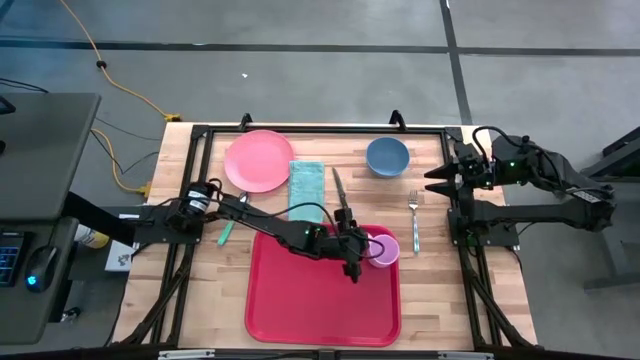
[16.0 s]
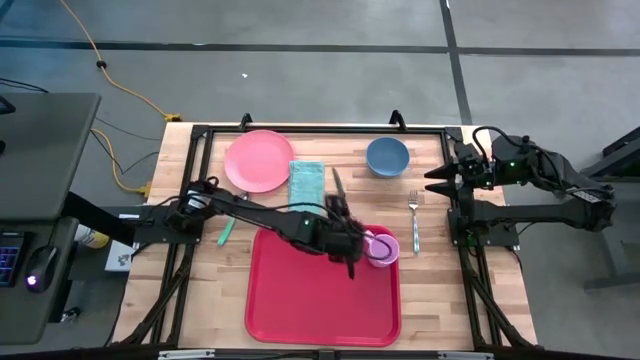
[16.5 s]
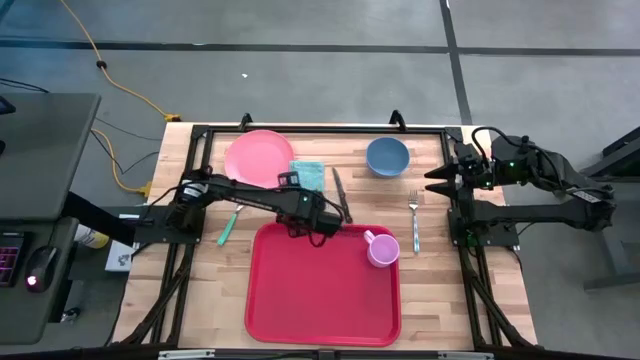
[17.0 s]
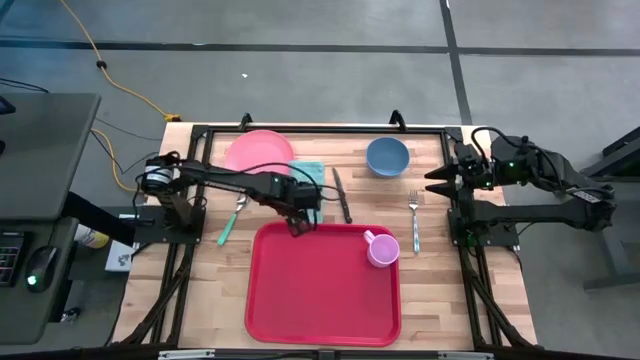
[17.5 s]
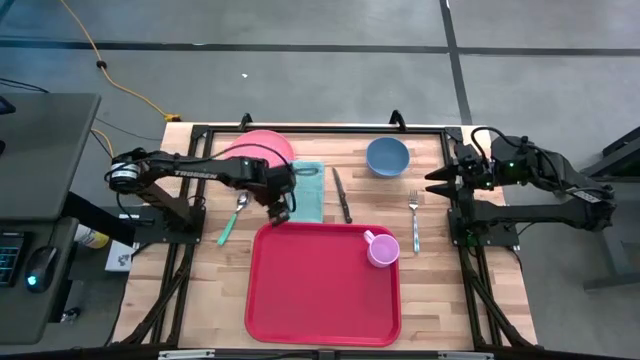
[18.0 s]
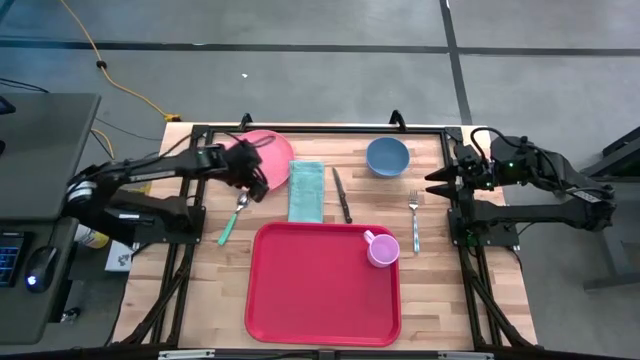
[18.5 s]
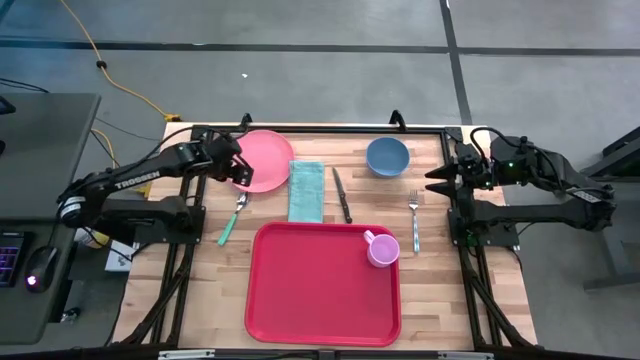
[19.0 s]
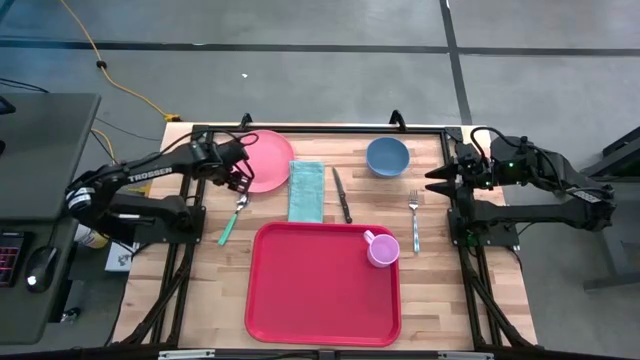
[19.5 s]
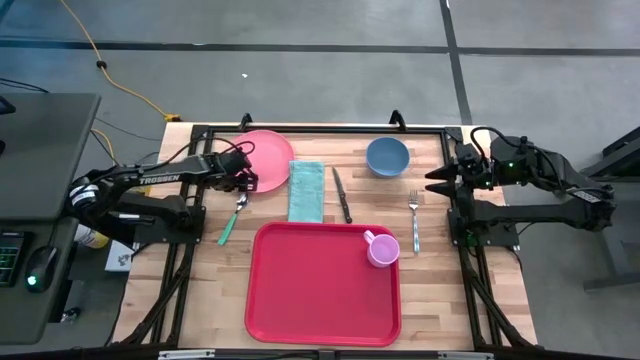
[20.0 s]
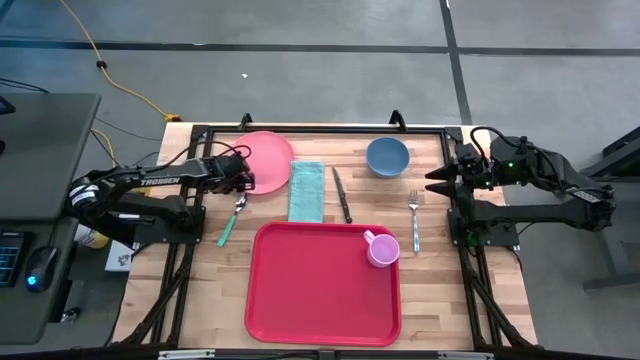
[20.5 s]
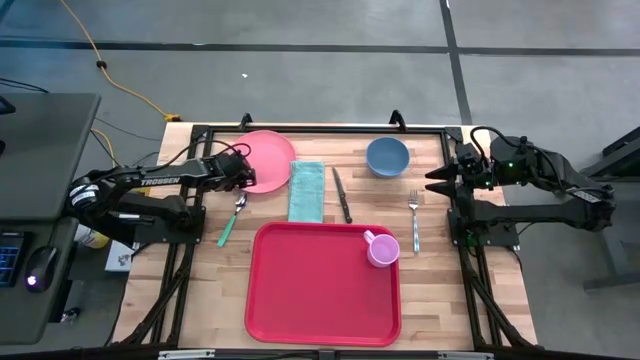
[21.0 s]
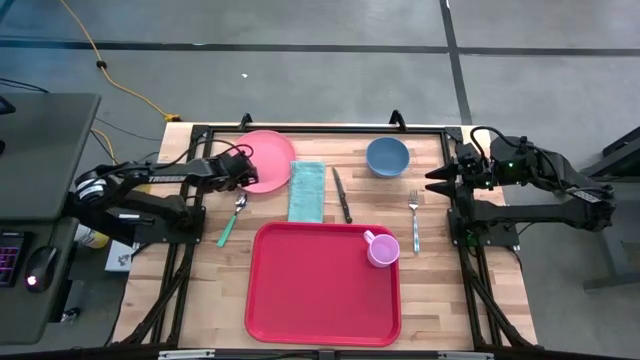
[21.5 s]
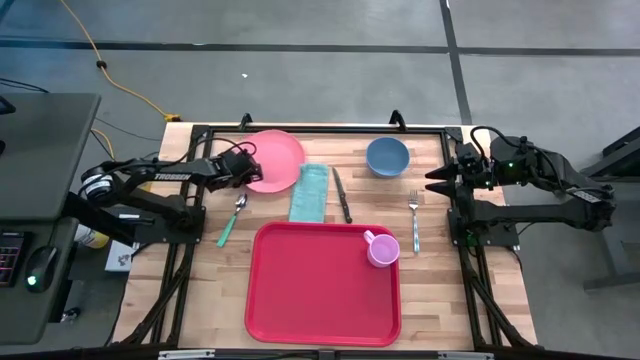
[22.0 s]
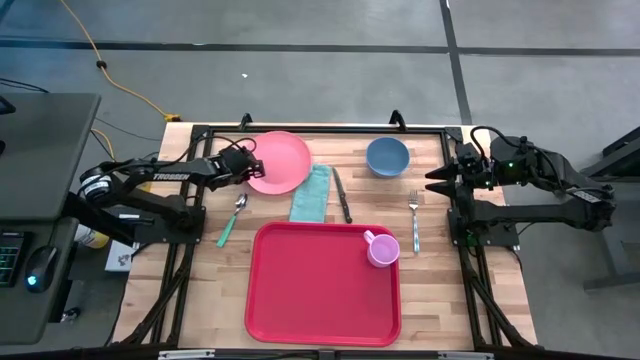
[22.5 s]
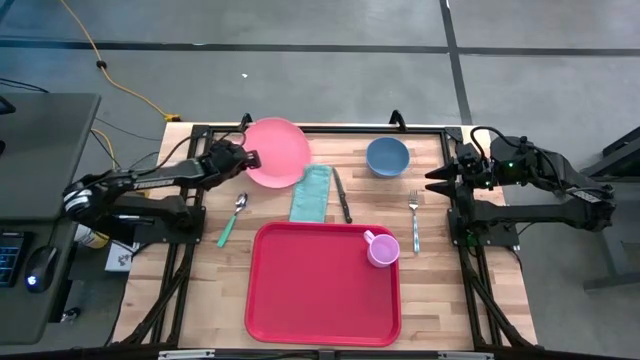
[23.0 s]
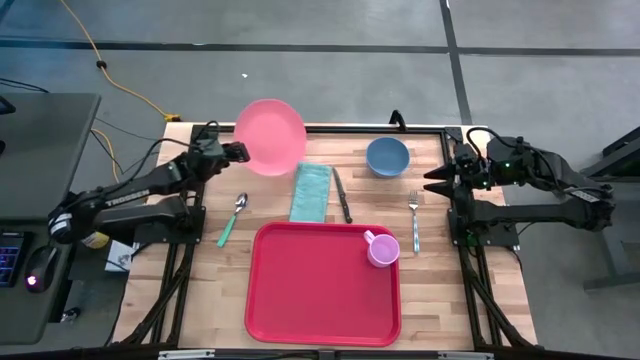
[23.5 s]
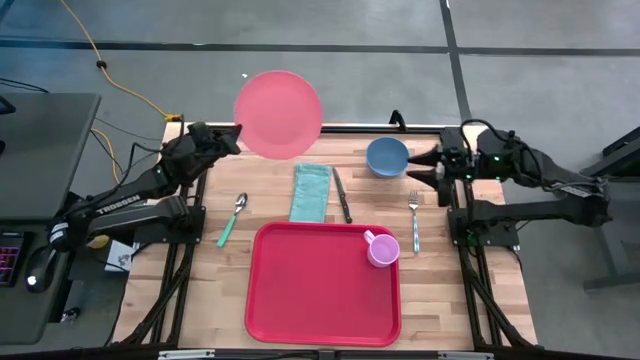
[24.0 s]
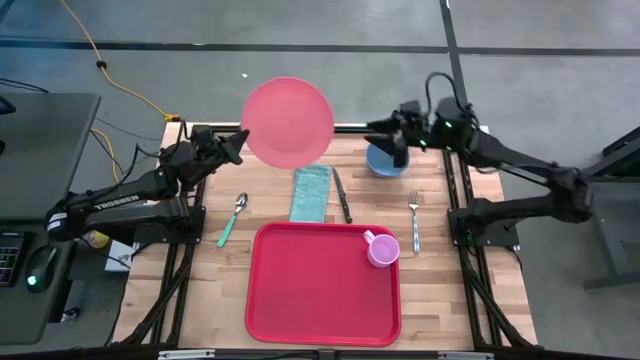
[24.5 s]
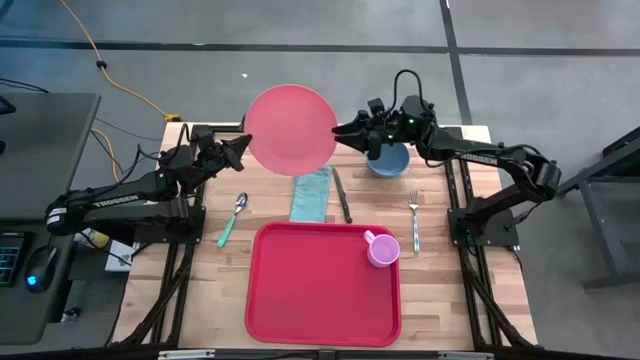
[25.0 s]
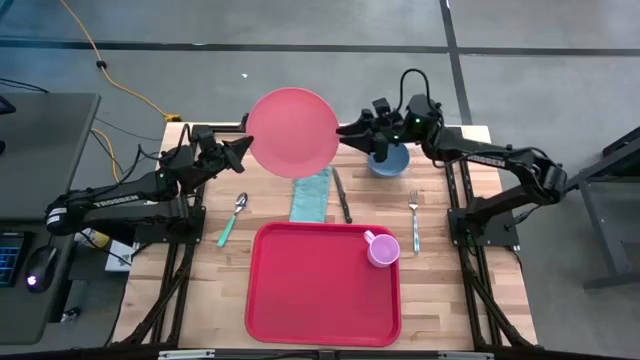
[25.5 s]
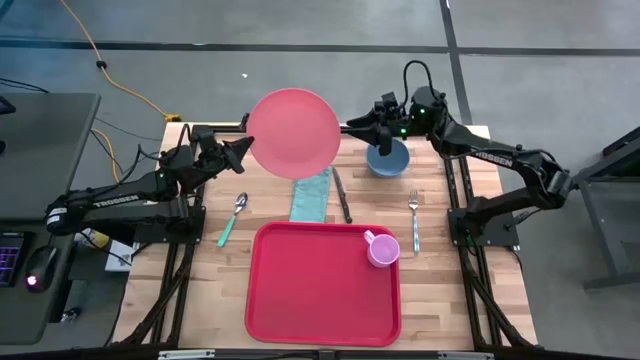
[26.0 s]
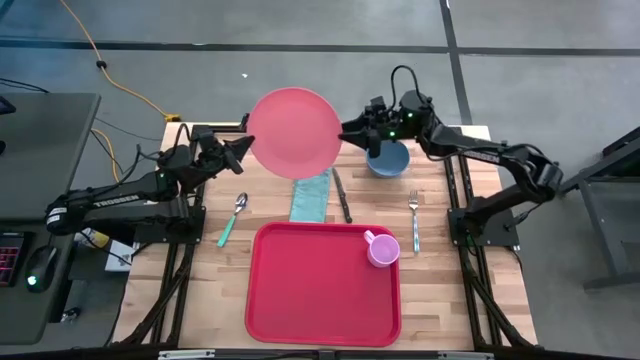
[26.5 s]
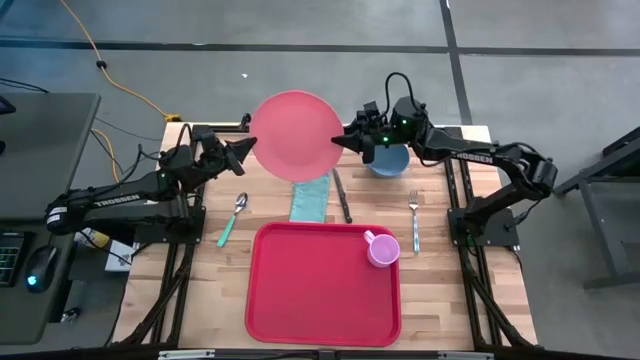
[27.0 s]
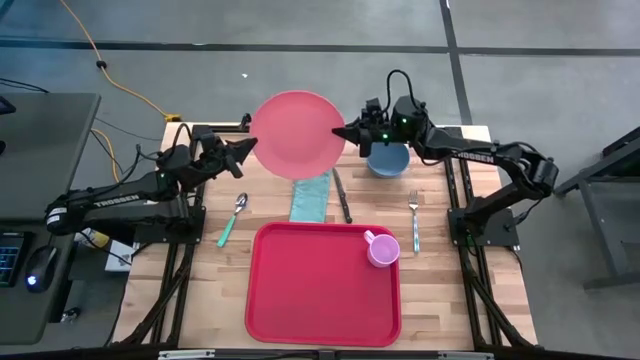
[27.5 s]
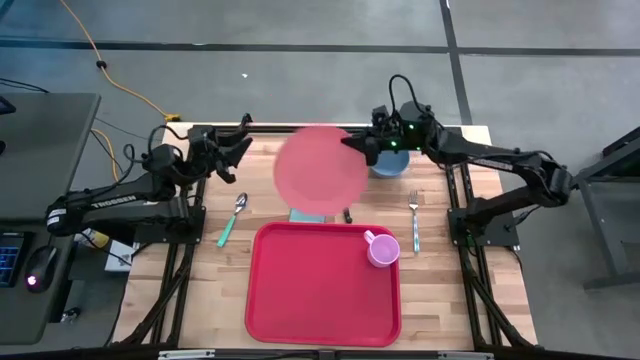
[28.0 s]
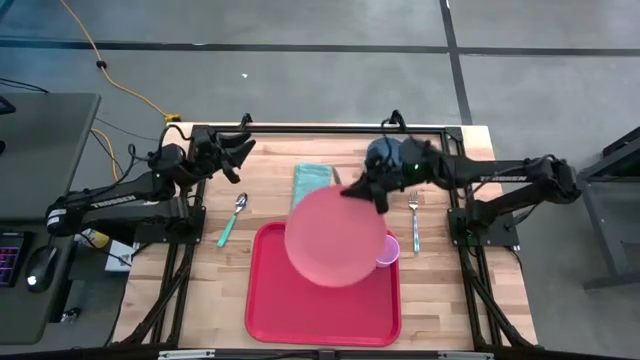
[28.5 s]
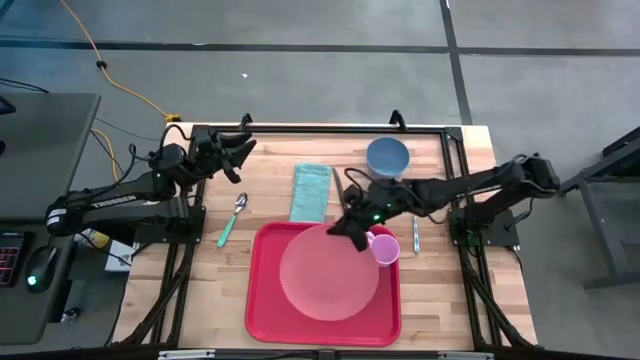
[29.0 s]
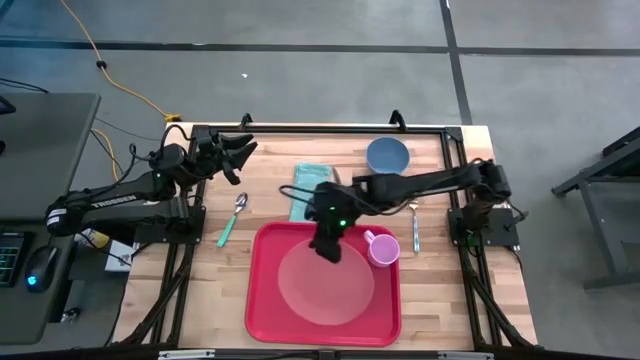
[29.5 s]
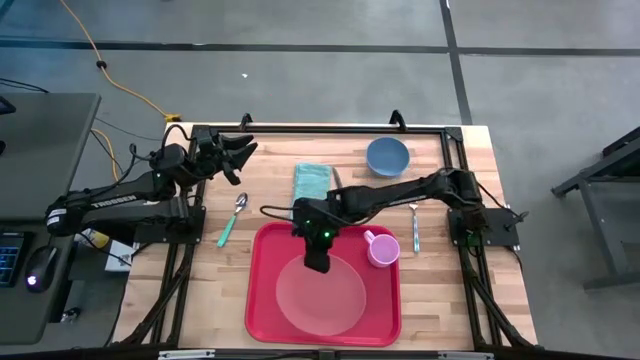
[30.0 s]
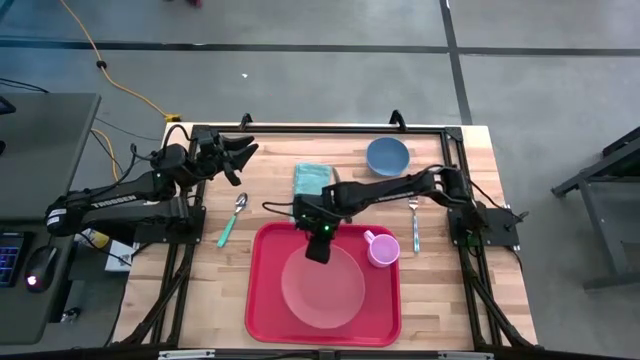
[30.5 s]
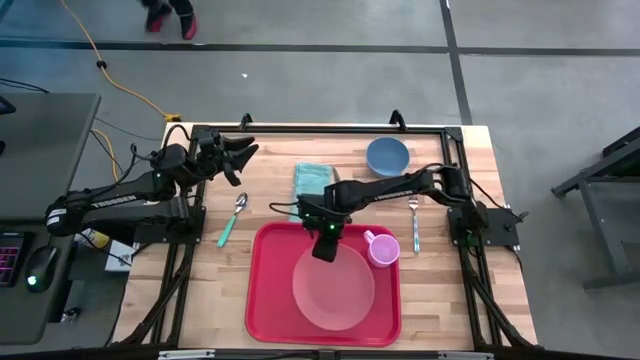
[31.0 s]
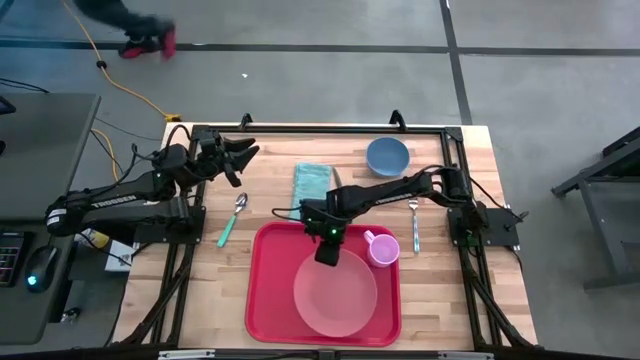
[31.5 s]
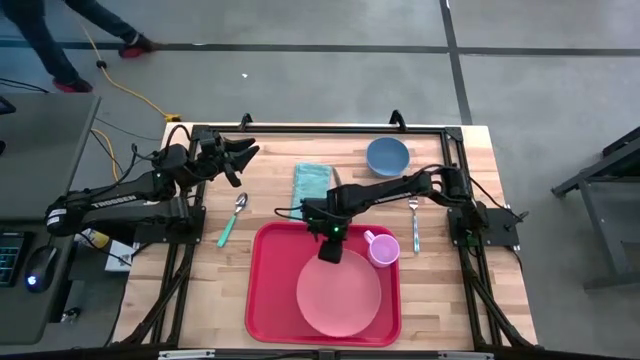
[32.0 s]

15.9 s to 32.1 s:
Task: Set up tray
Put the pink plate on the red serving tray to the bottom left of the pink mug

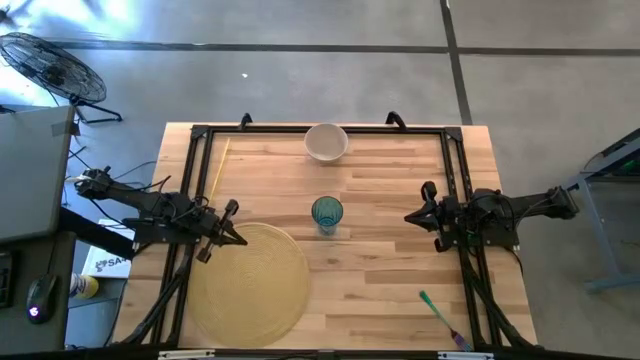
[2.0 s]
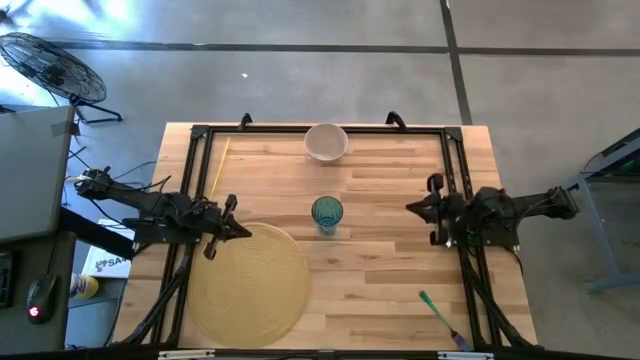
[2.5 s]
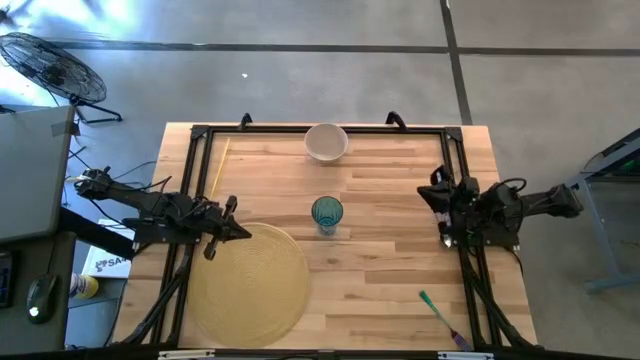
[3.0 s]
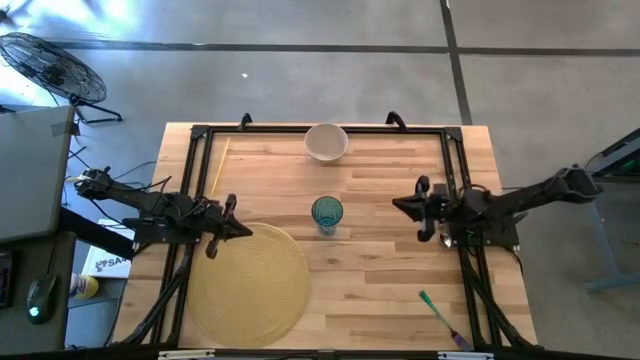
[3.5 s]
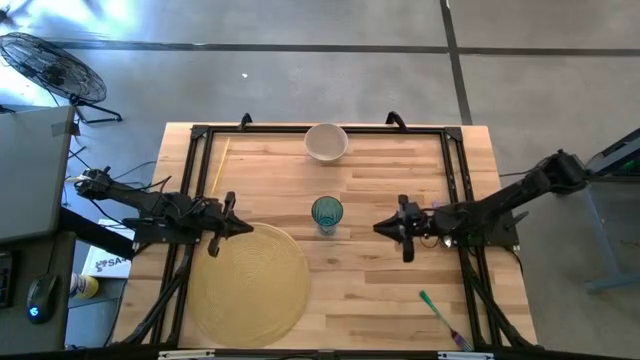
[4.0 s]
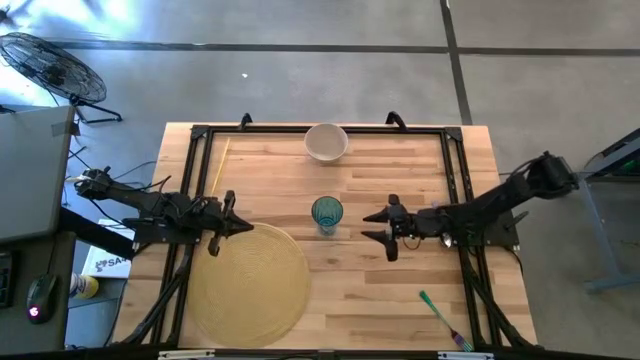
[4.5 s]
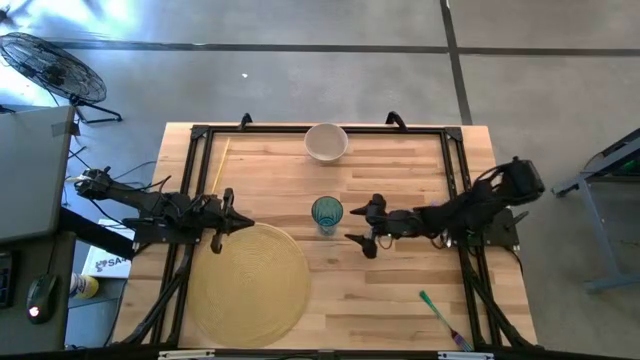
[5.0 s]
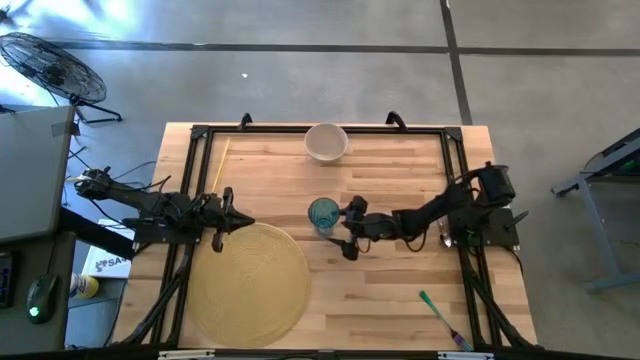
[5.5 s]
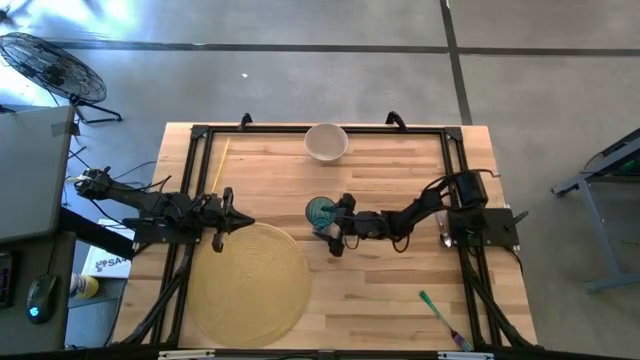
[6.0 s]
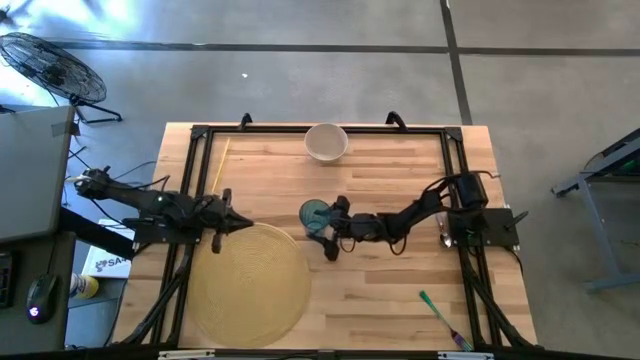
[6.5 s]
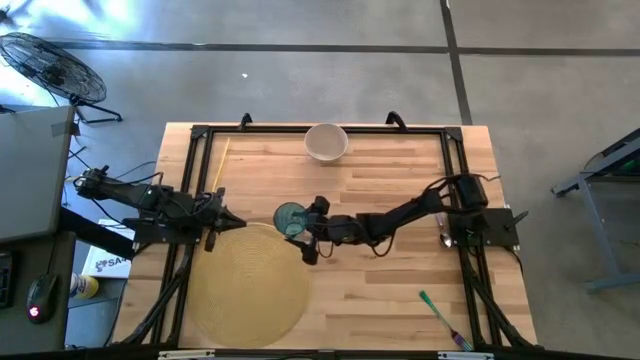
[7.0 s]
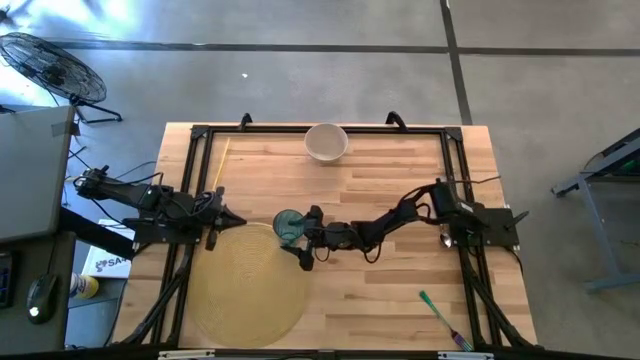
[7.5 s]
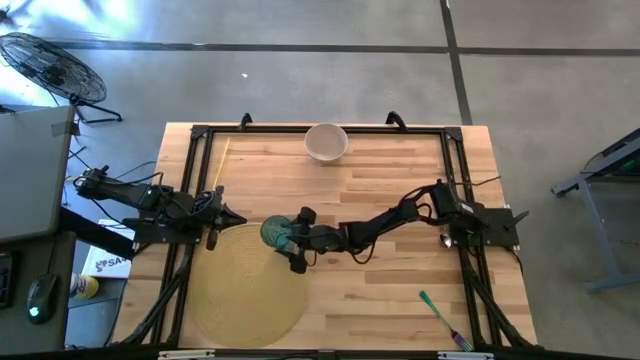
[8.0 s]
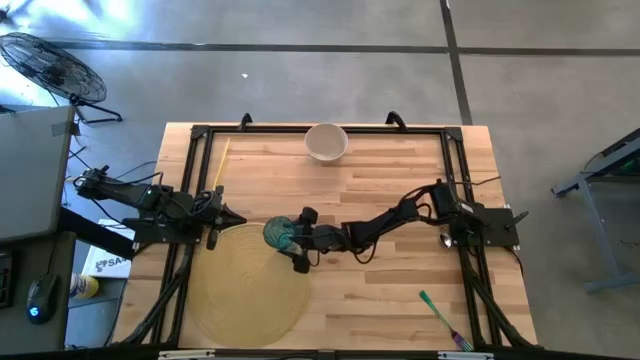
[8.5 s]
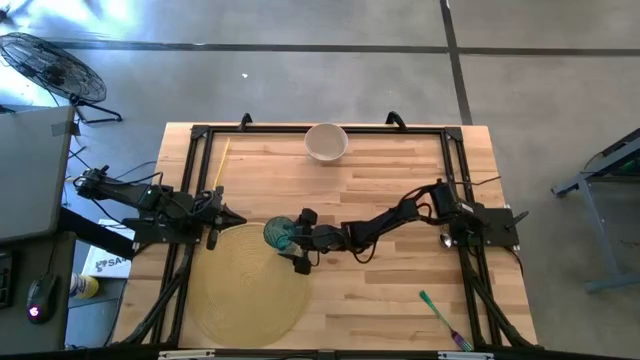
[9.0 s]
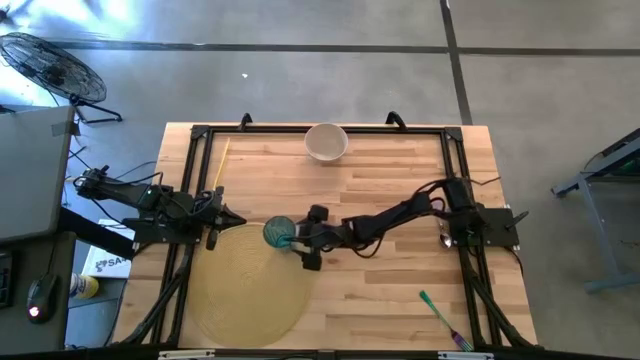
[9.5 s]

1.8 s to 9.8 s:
Task: Pick & Place Utensil
Put the blue cup on the woven mat
